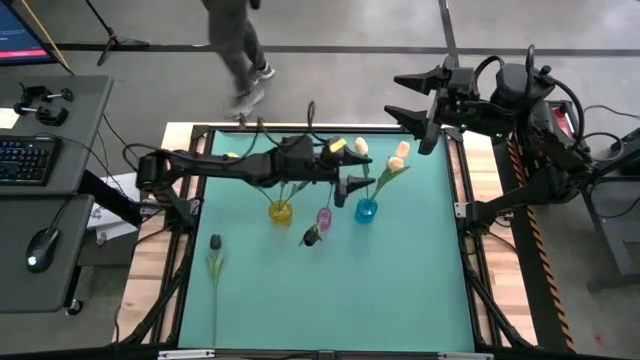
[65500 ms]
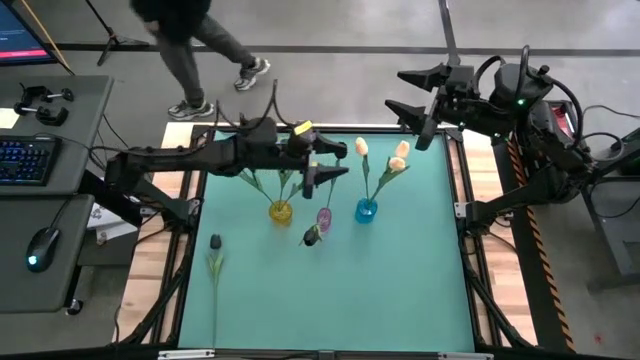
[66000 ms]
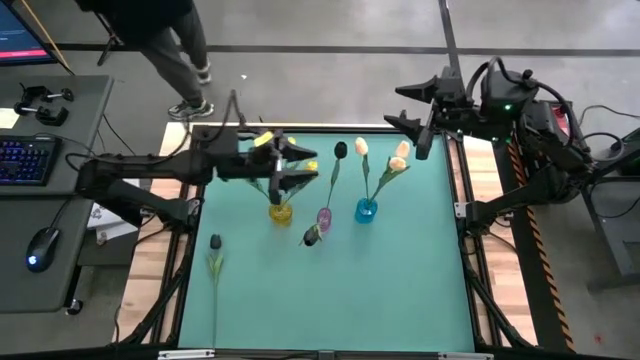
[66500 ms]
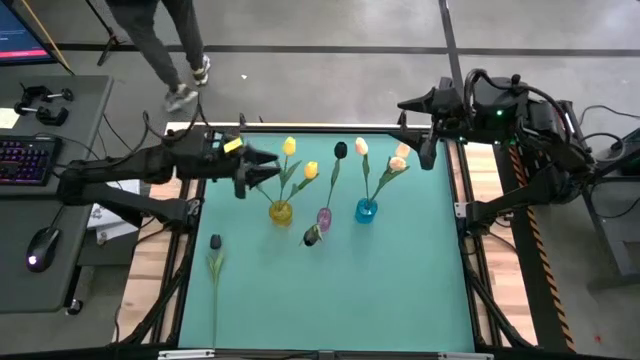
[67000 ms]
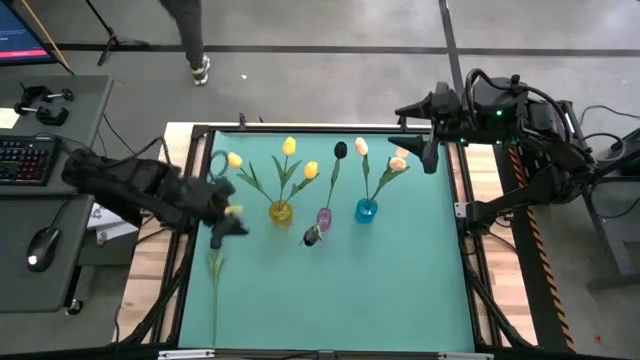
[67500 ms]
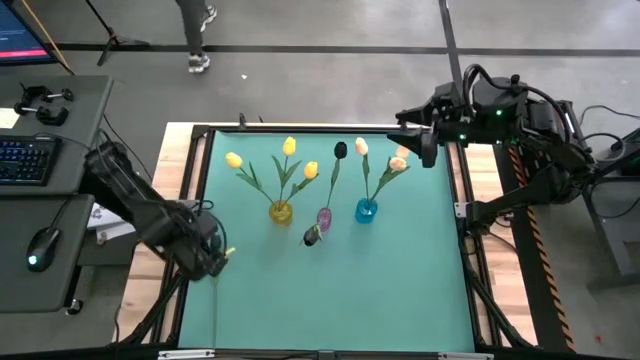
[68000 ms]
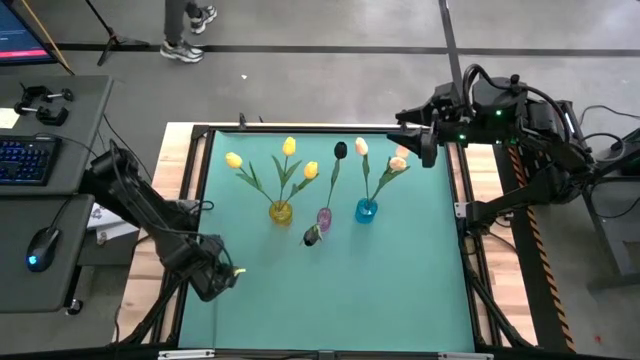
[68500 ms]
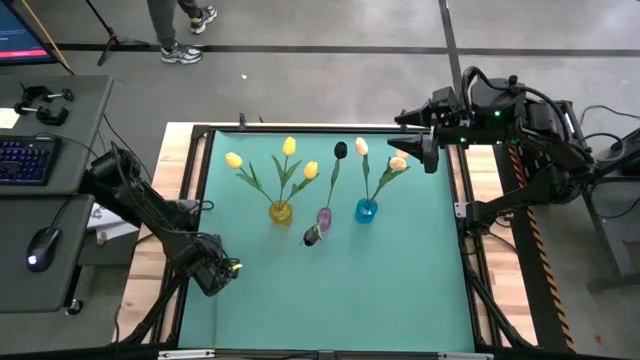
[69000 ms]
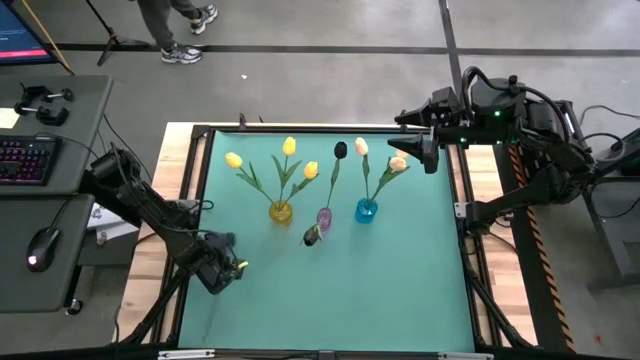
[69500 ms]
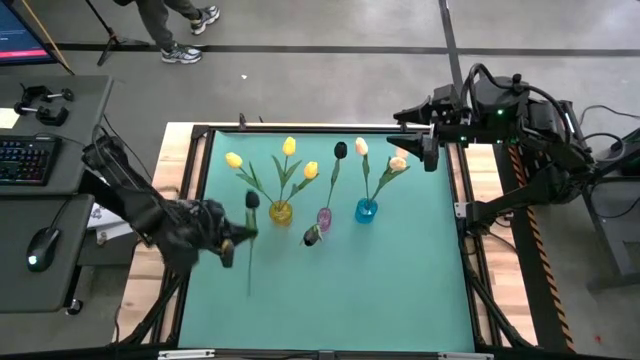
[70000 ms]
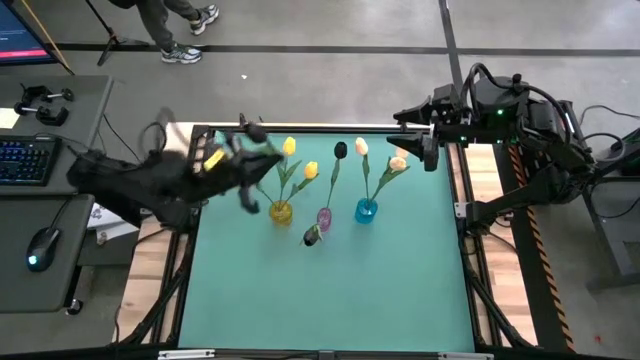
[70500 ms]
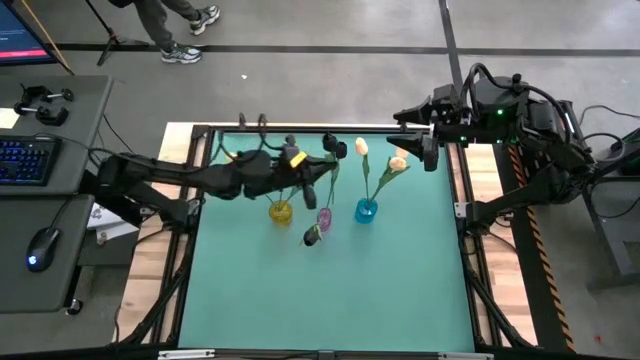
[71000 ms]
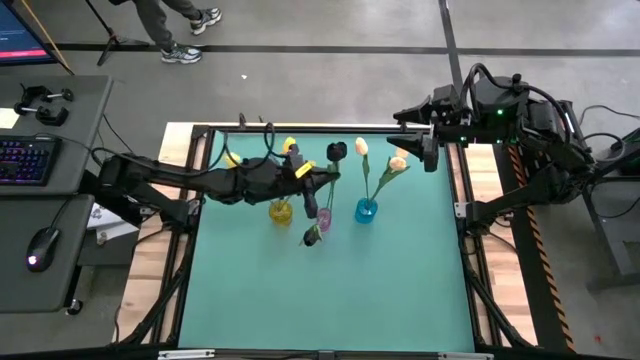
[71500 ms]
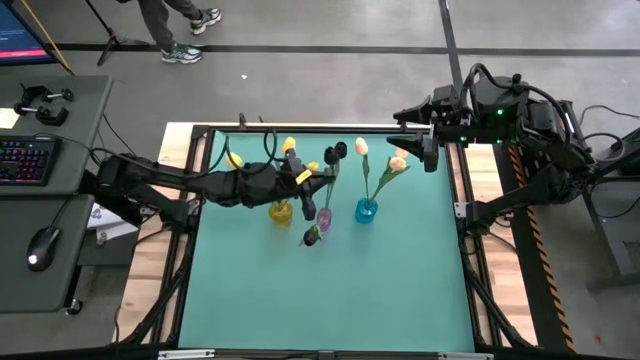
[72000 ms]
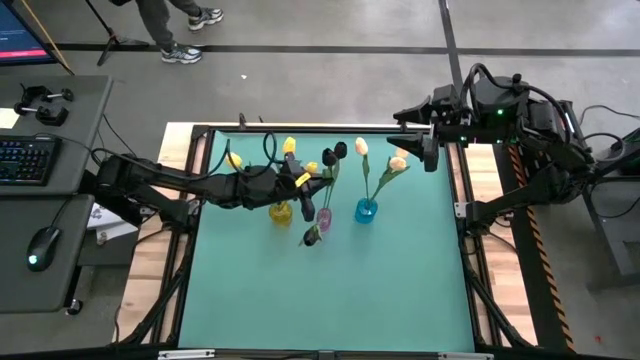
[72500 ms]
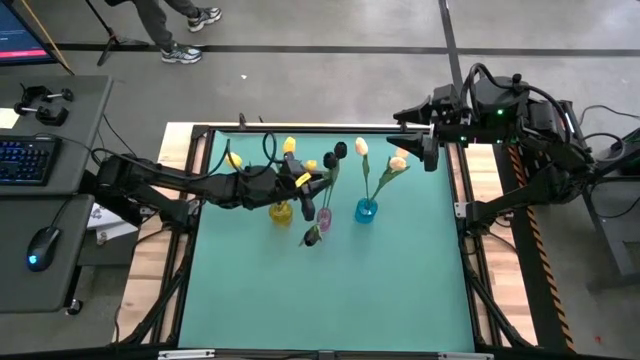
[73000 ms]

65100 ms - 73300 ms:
Task: Sort flowers into vase by color
Put the black tulip into the purple flower vase

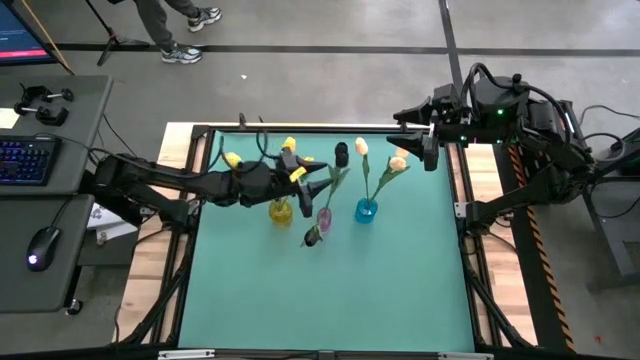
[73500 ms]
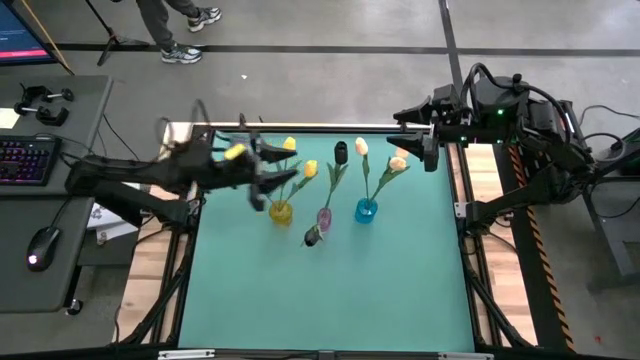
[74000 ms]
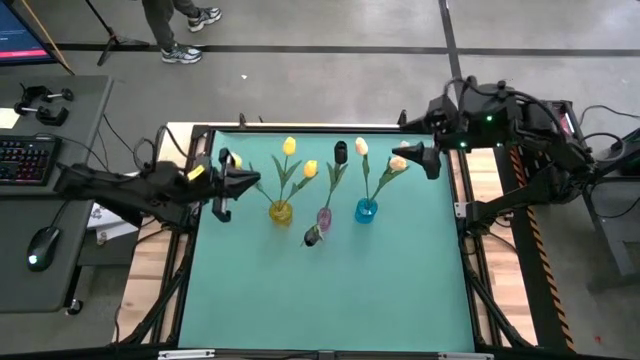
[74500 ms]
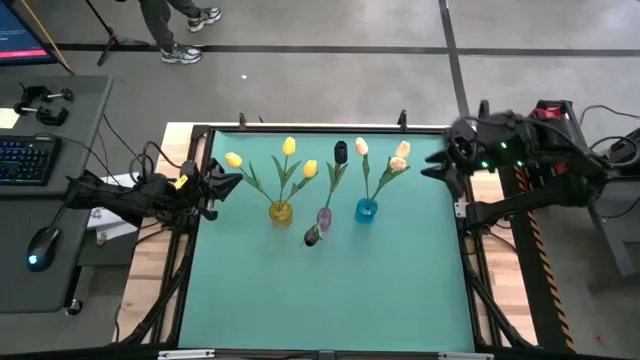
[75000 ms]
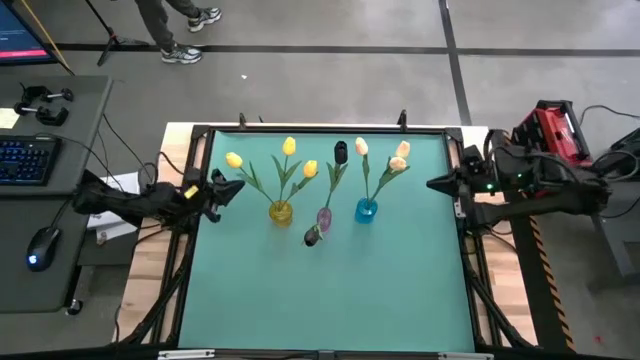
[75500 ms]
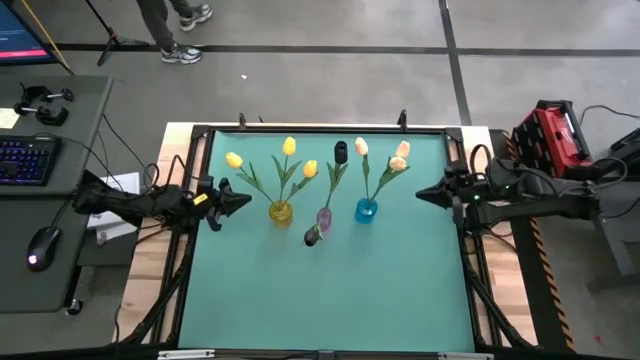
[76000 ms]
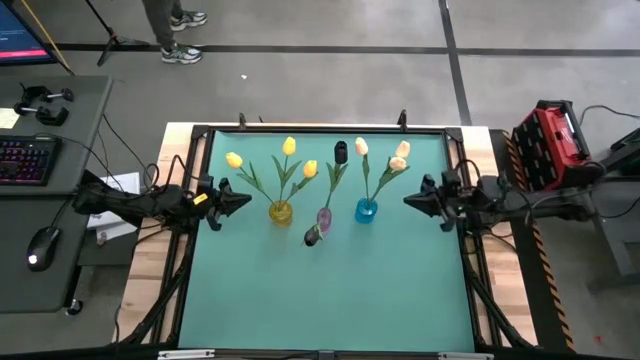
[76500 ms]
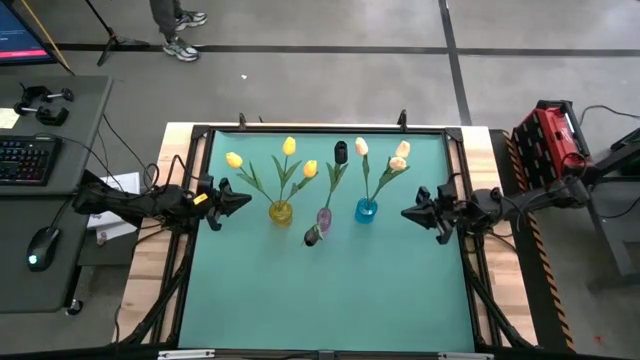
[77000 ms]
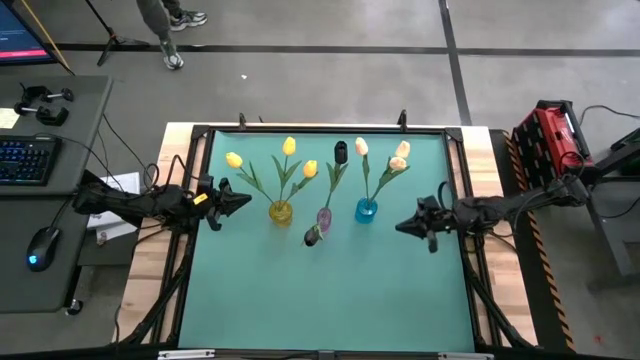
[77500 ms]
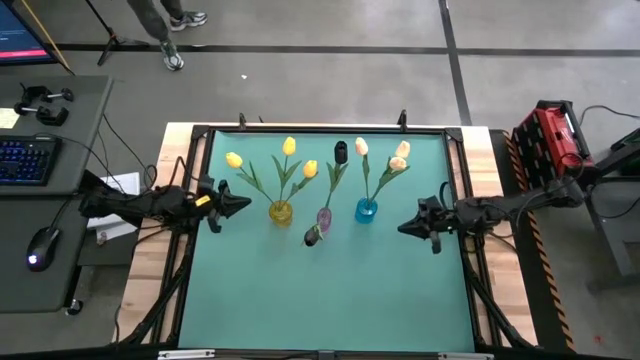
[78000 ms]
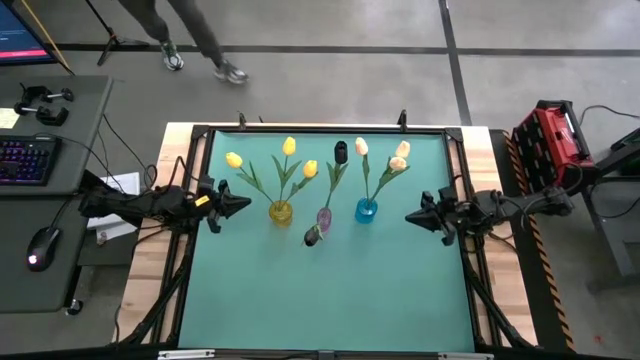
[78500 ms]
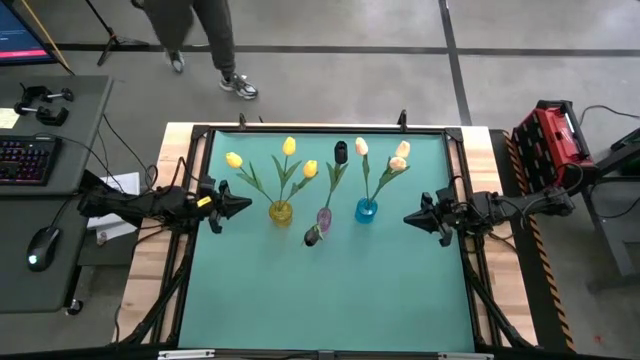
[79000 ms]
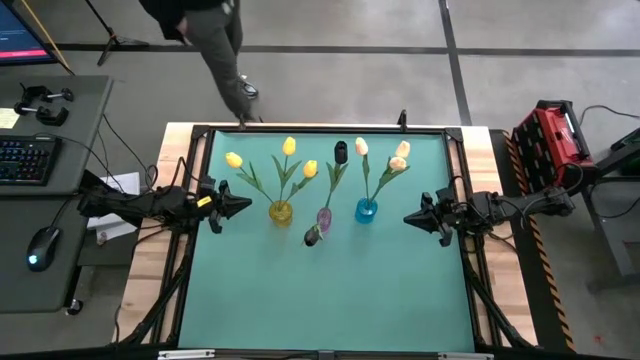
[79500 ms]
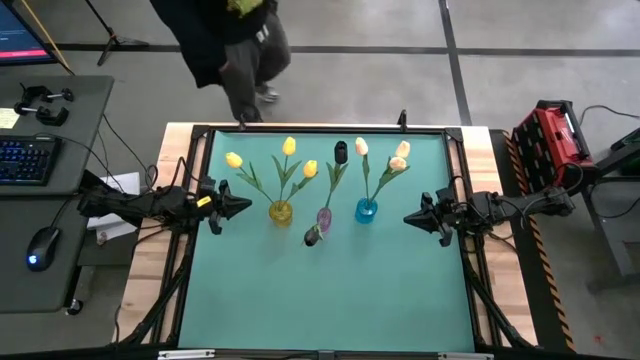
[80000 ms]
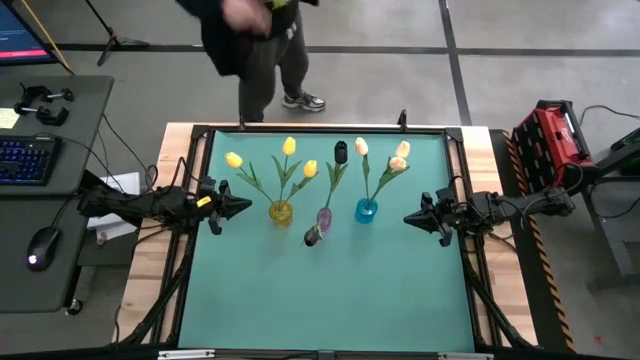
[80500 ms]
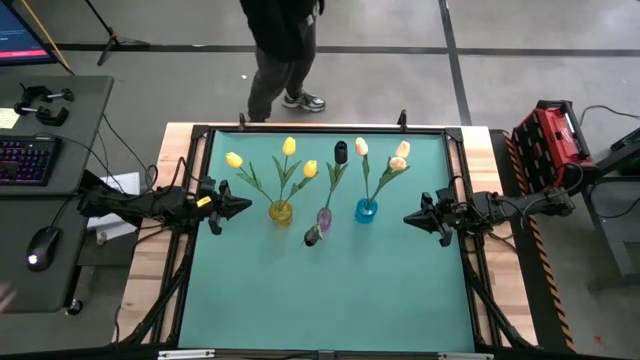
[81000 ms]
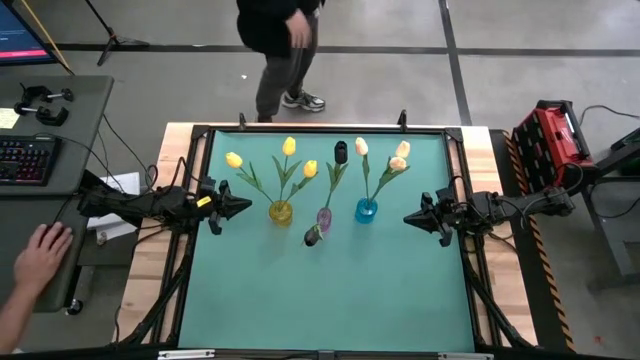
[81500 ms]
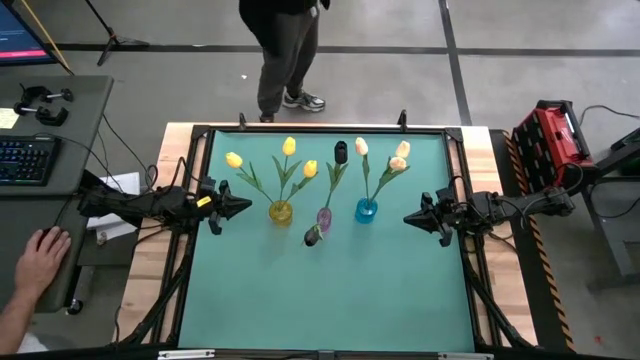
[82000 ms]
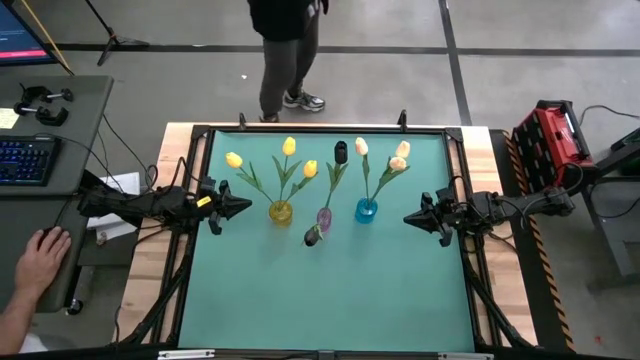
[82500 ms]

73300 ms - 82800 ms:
Return to Home Position

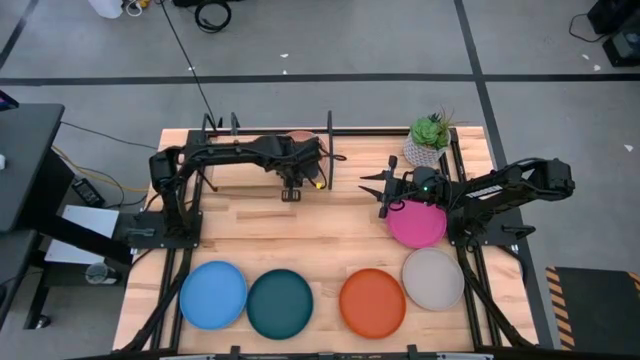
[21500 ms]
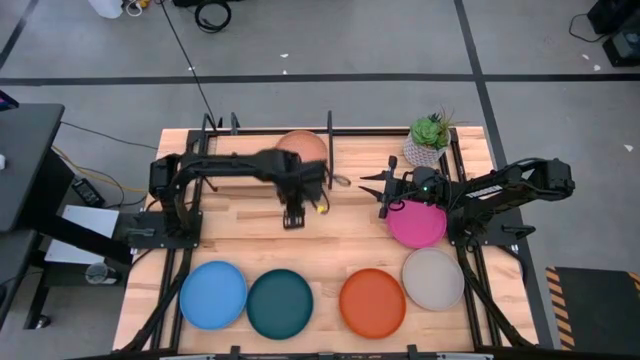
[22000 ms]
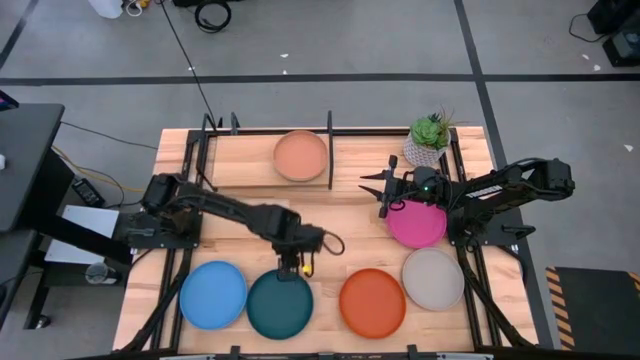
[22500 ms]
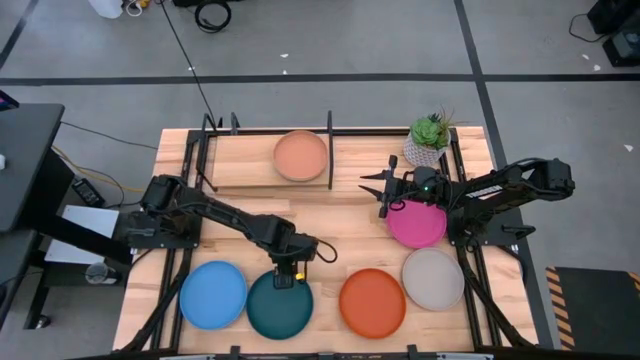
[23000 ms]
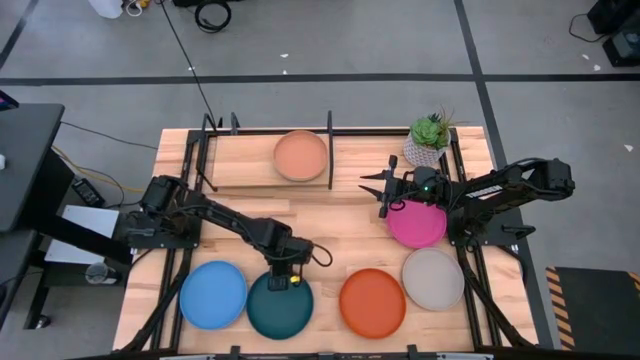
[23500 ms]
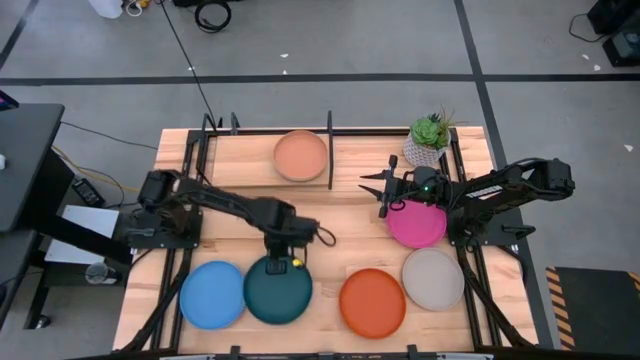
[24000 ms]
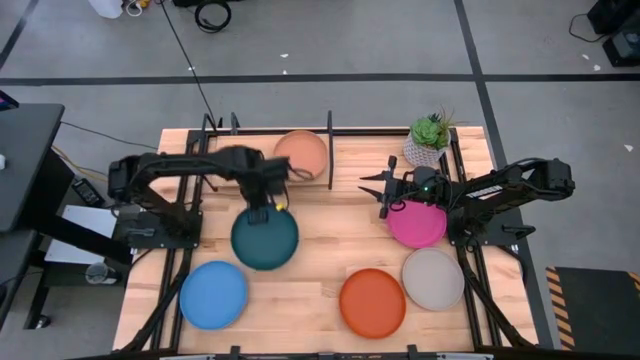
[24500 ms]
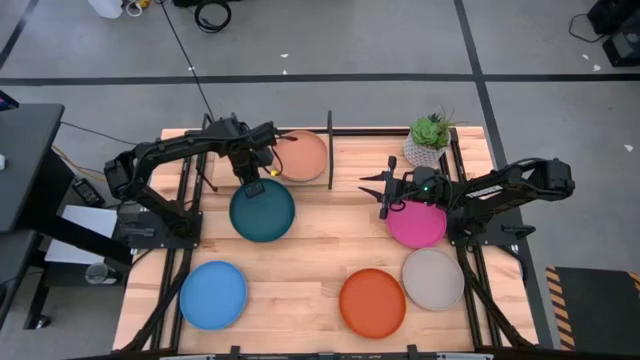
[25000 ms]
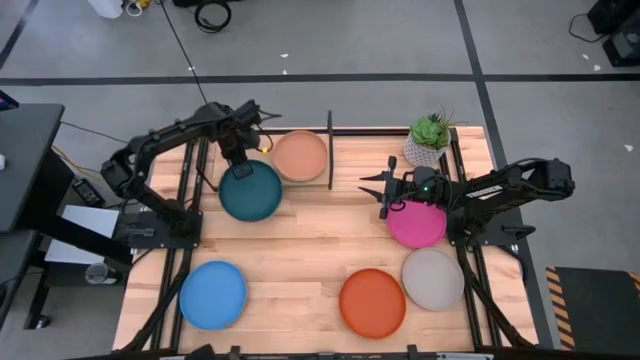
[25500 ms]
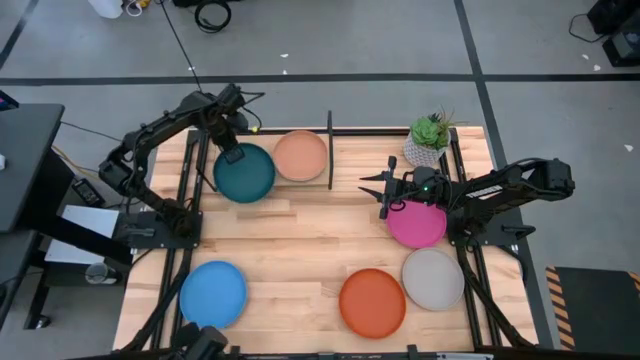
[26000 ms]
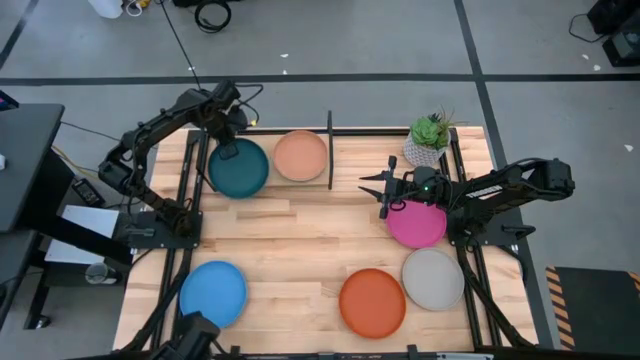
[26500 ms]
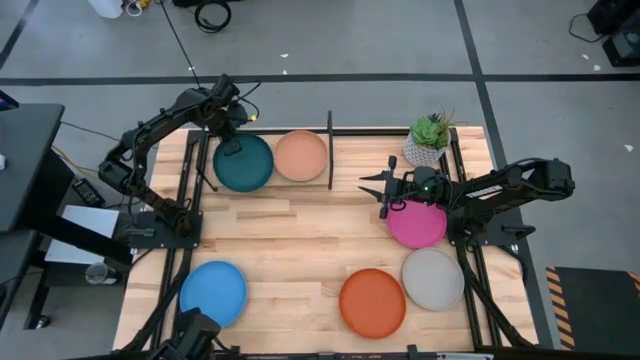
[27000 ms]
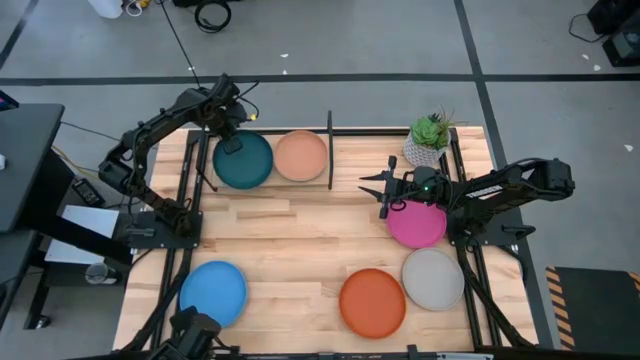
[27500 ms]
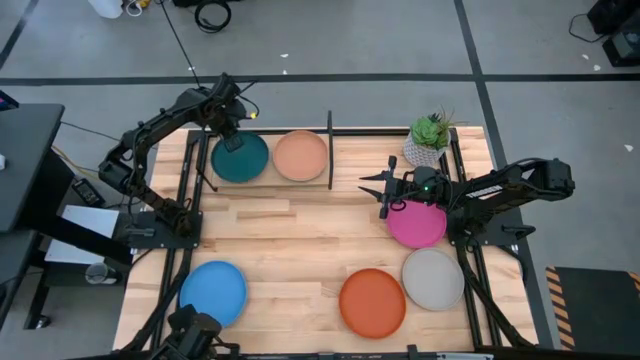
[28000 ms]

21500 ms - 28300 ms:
Task: Place and stack plates onto a shelf
Put the dark blue plate on the shelf
